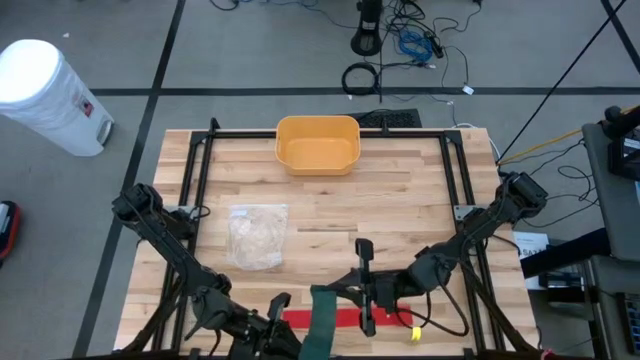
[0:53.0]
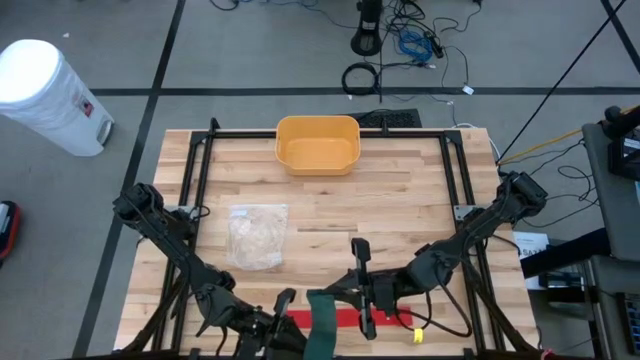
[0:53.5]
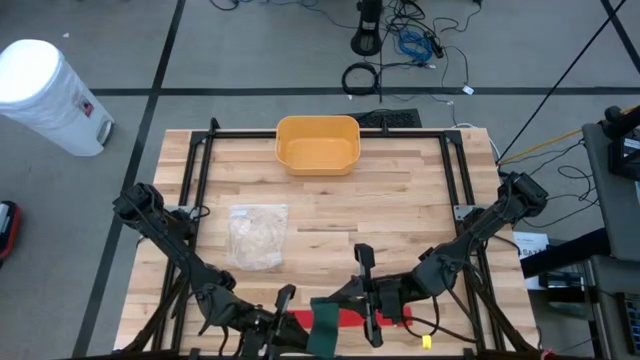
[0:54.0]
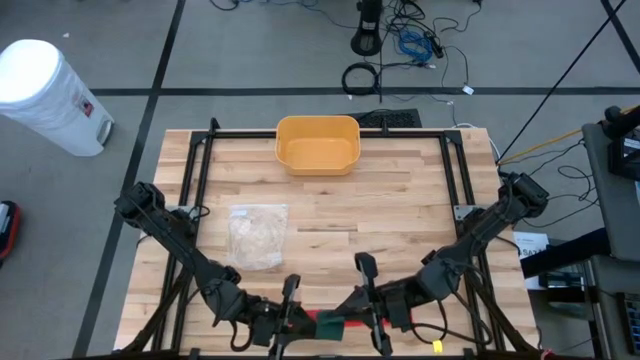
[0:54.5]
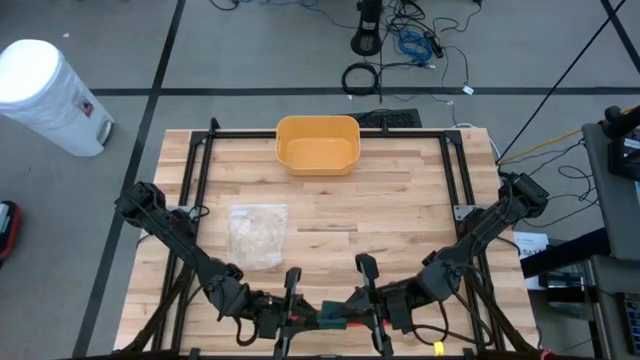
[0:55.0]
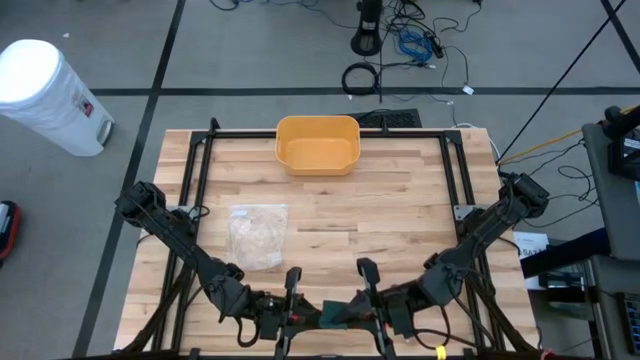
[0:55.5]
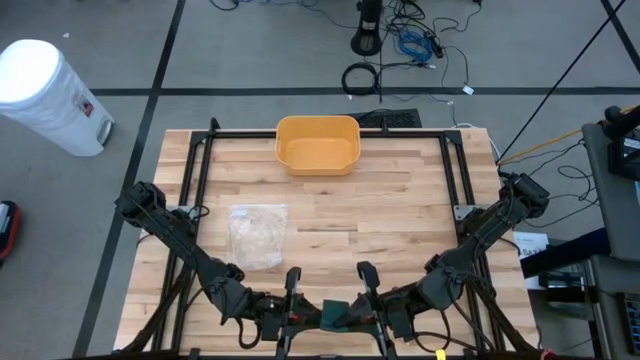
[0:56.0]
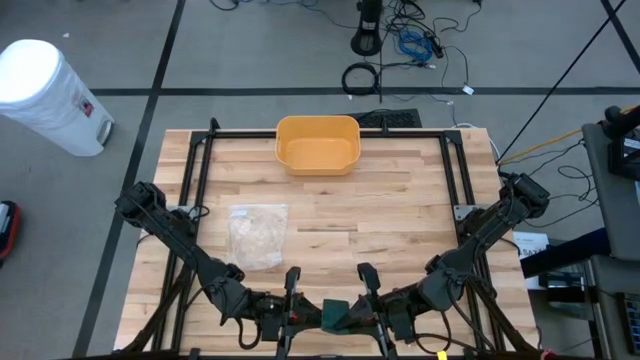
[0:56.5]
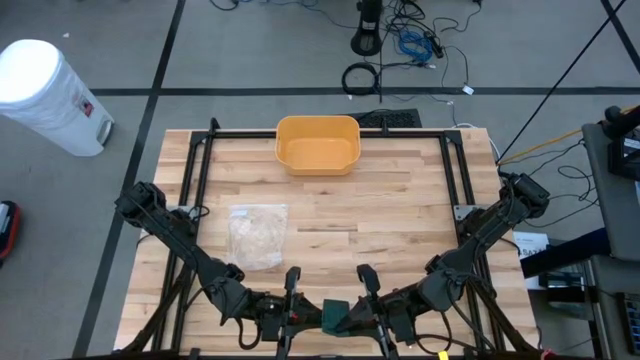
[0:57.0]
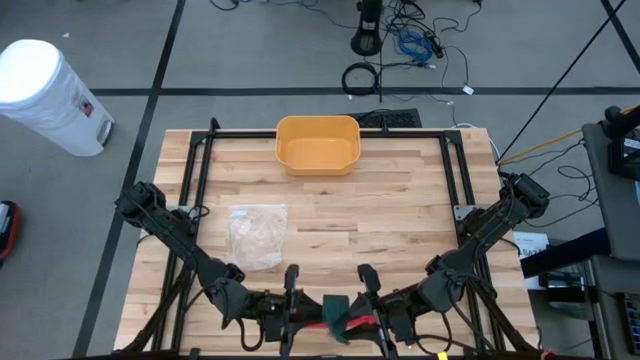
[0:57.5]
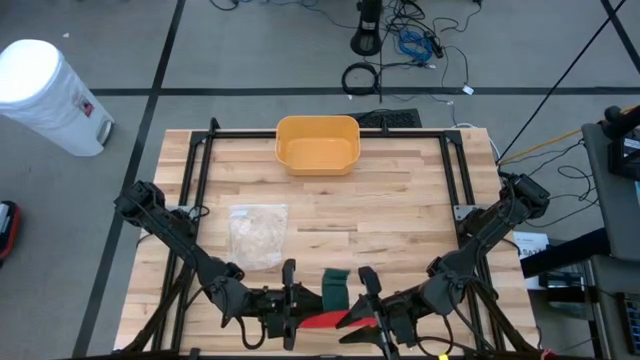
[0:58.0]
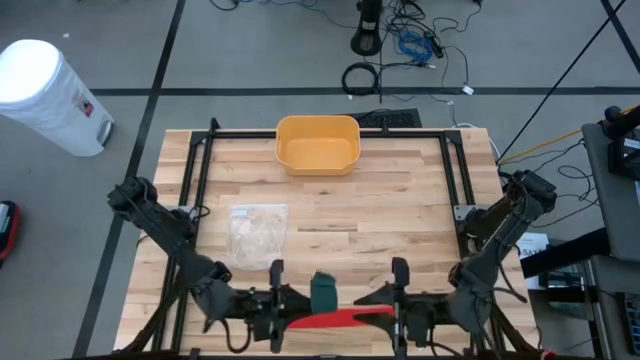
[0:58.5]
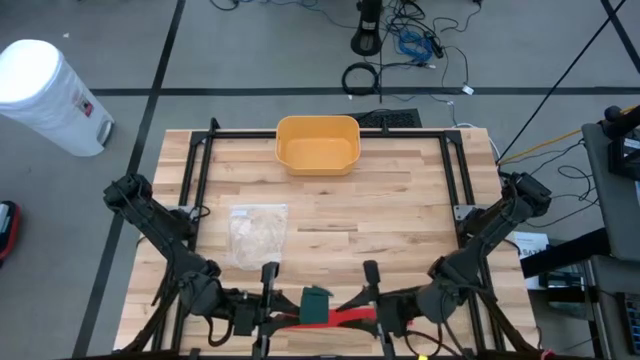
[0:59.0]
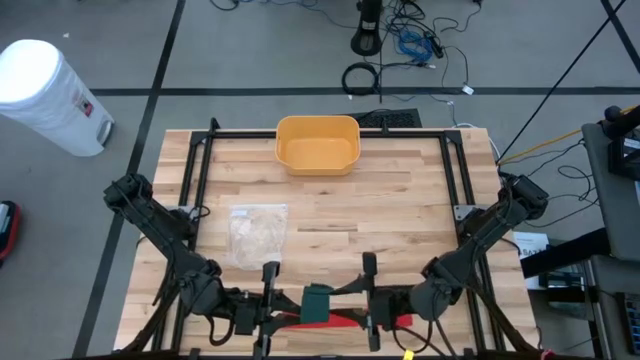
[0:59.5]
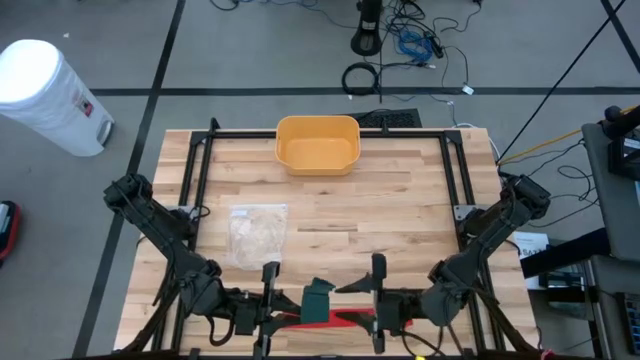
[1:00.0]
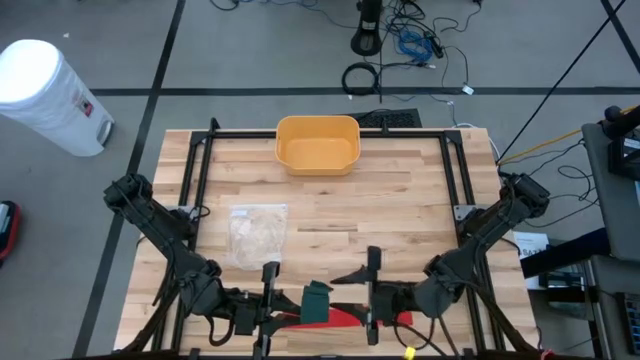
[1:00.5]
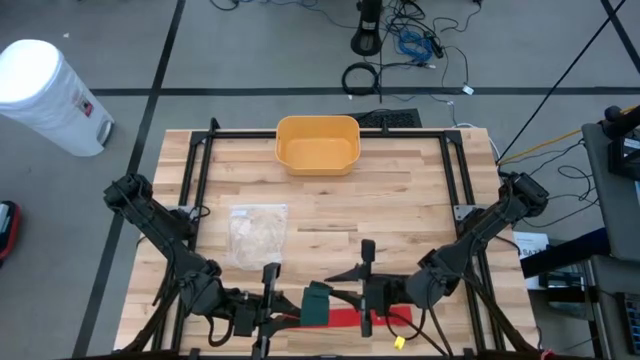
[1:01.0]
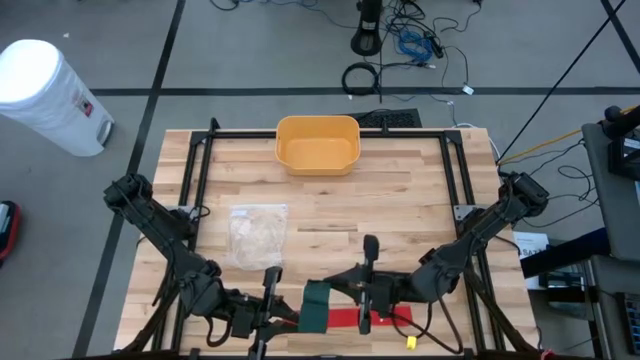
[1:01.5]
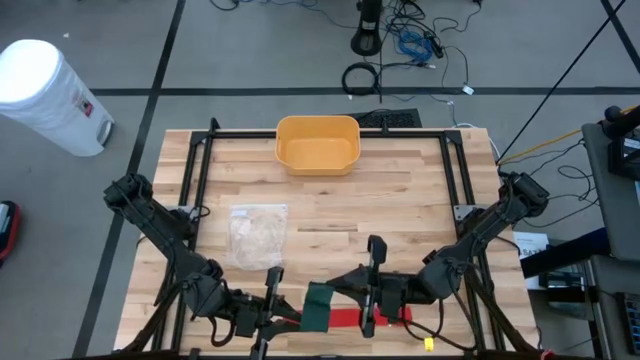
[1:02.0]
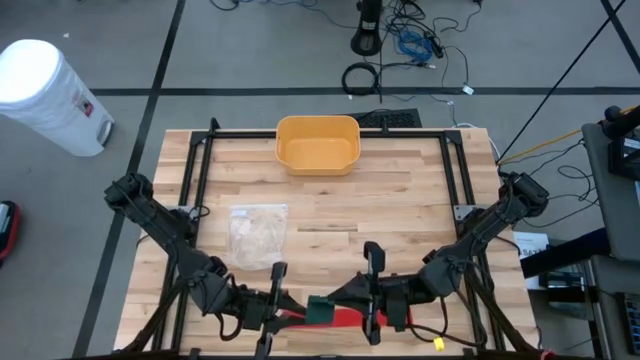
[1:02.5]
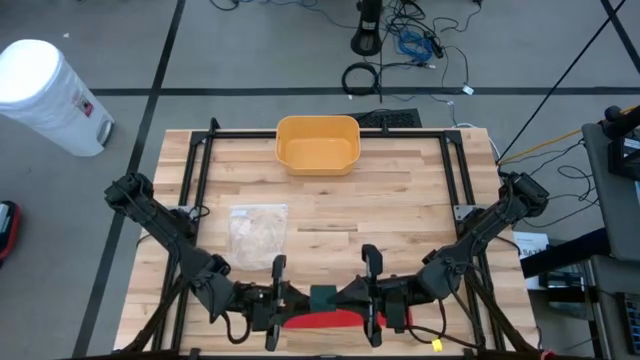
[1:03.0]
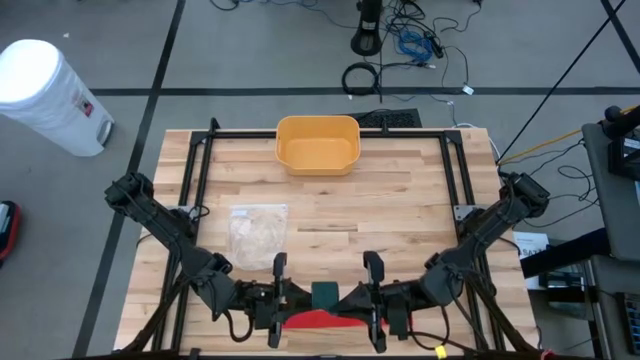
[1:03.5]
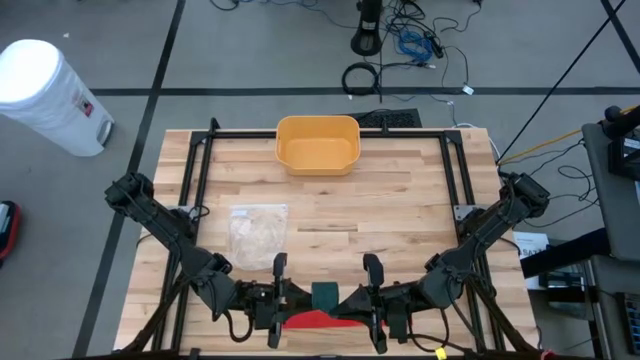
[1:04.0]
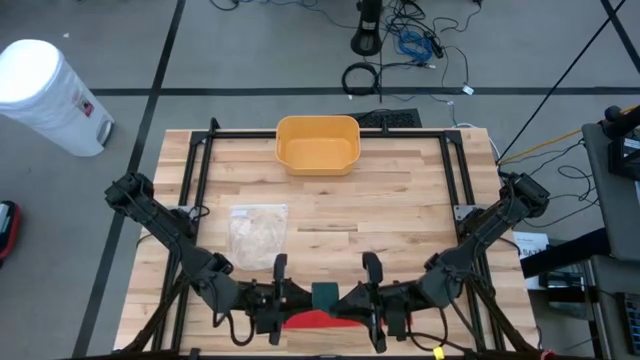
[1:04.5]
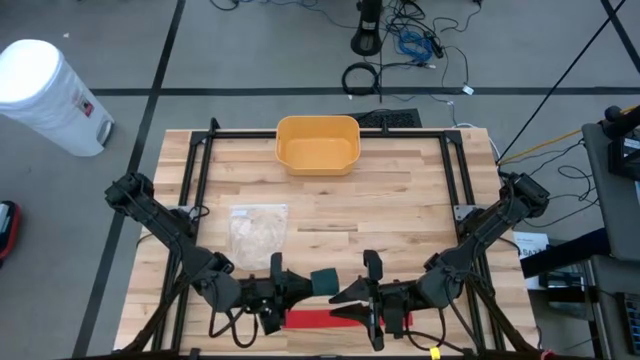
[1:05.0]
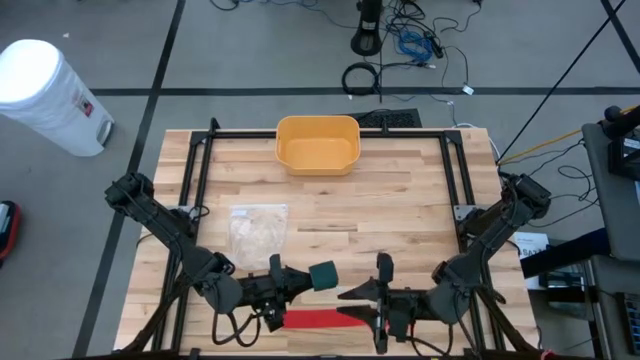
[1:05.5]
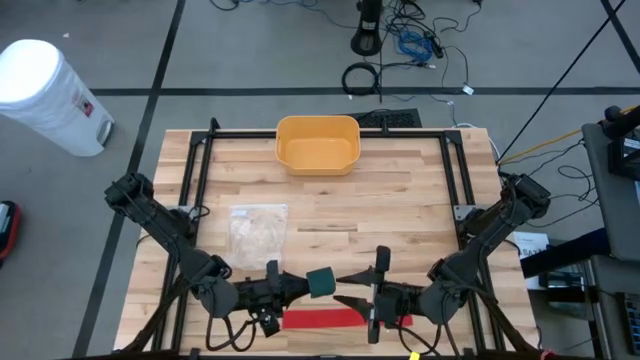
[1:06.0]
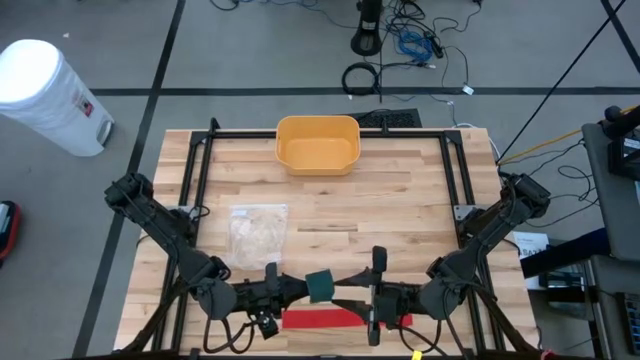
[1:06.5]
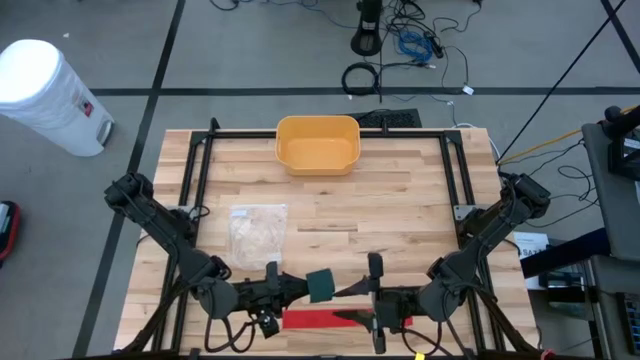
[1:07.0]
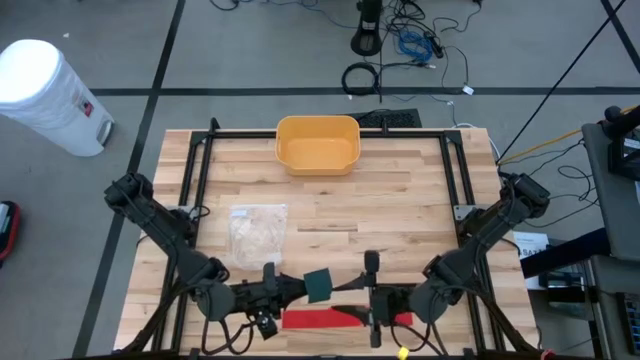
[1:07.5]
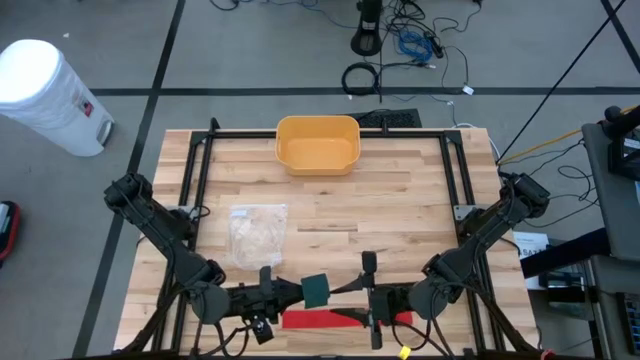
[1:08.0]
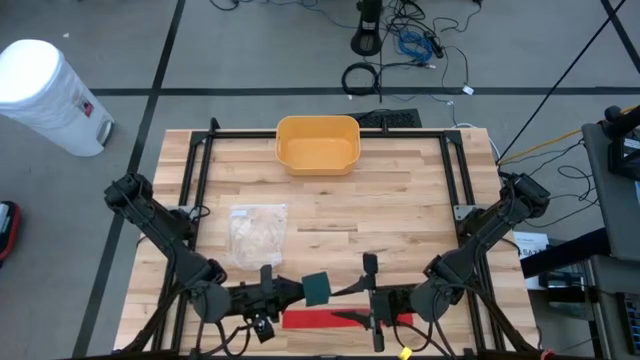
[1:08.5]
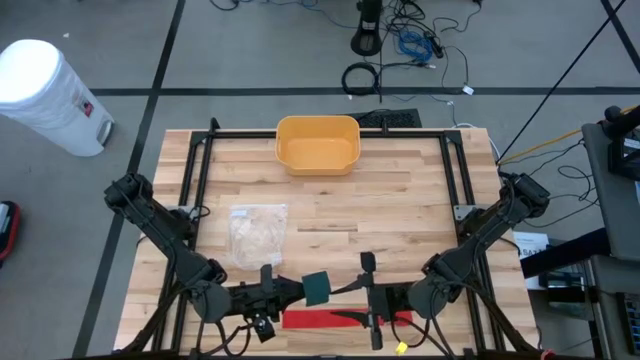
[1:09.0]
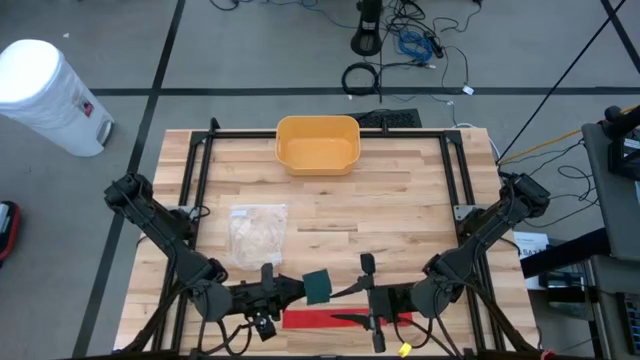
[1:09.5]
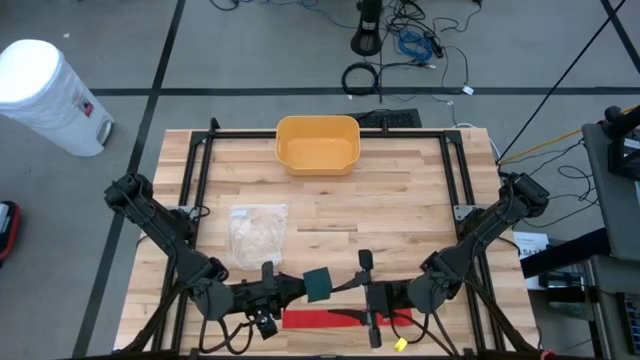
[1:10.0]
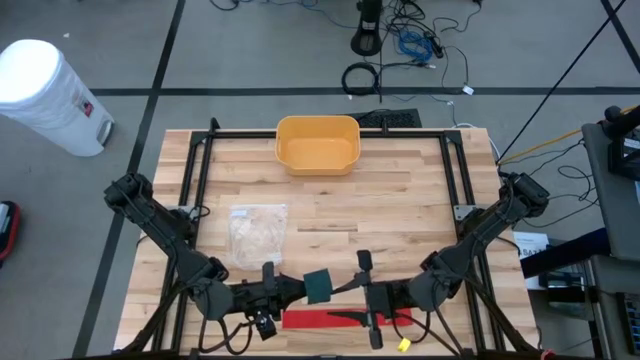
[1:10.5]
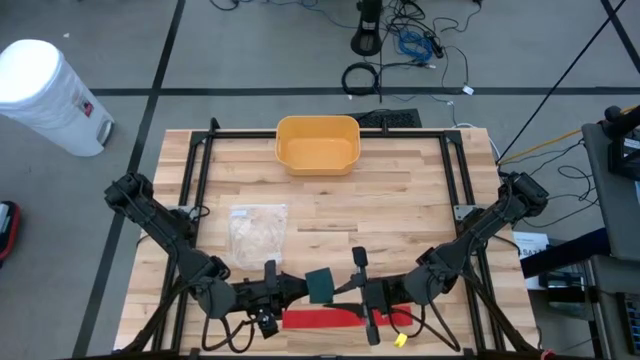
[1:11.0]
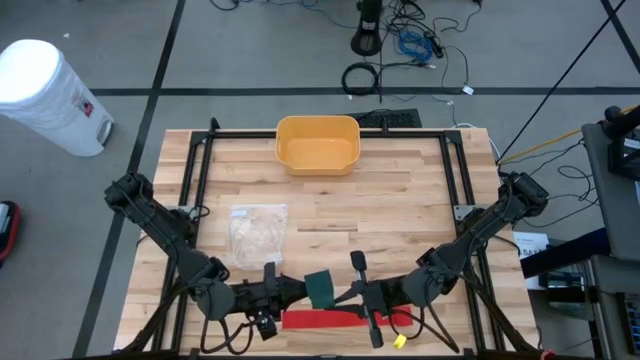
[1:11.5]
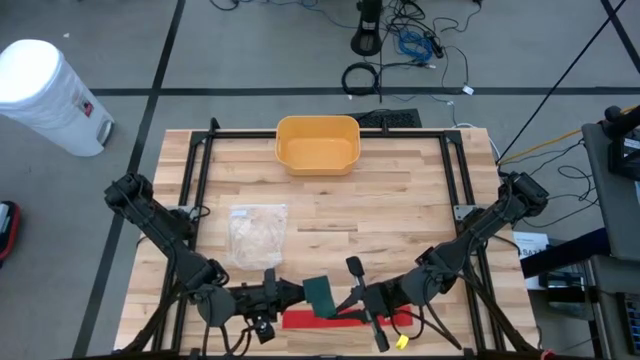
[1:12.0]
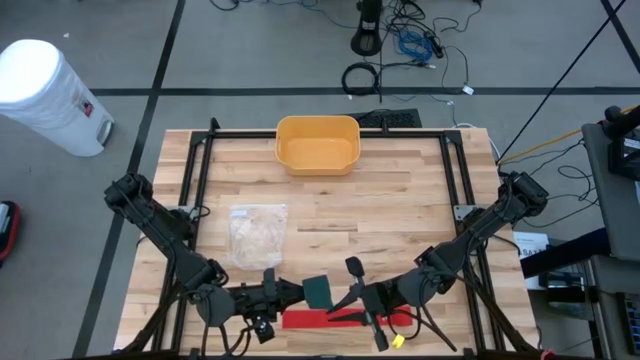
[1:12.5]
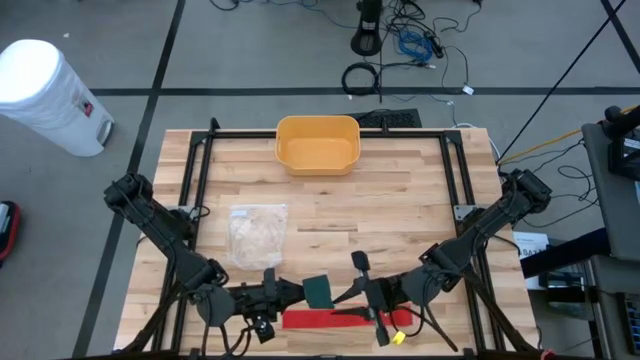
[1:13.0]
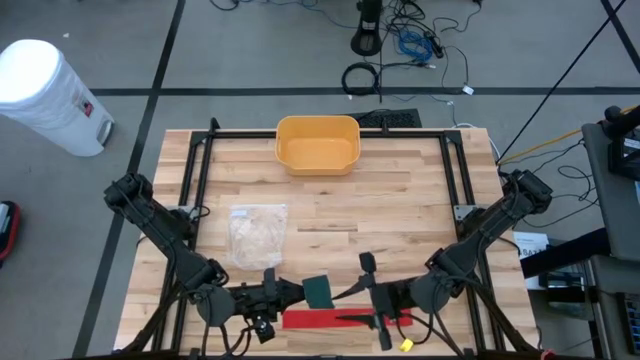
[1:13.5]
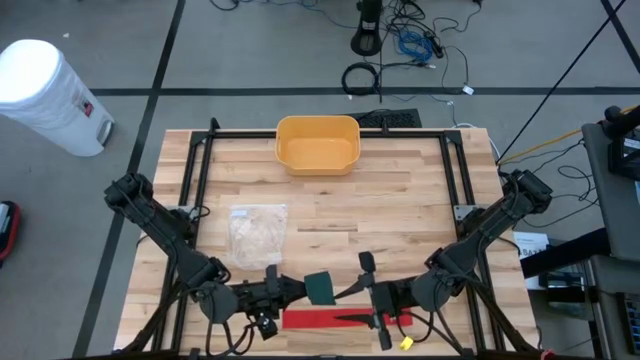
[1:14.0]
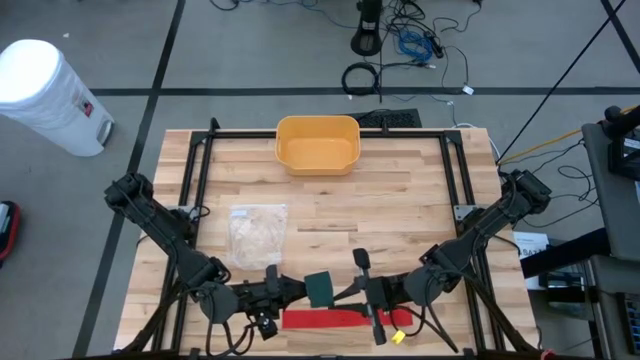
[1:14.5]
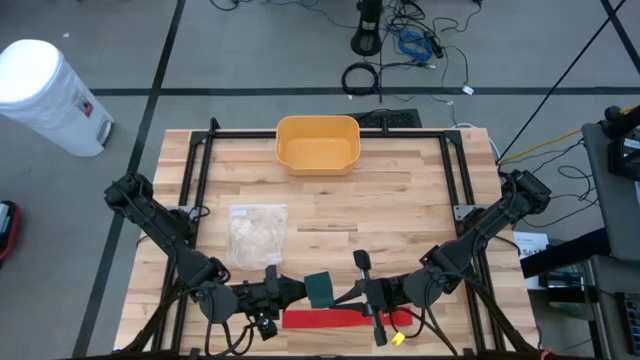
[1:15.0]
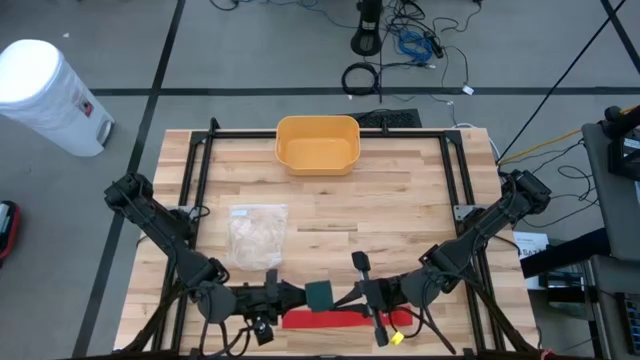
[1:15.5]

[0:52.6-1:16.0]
Task: Roll bandage
Roll the green bandage
